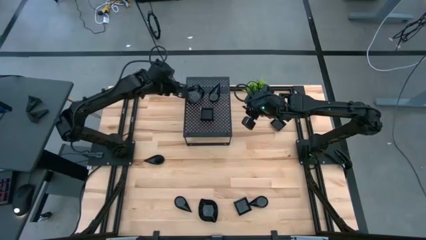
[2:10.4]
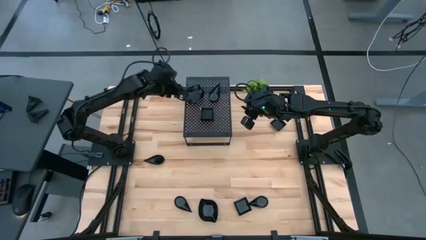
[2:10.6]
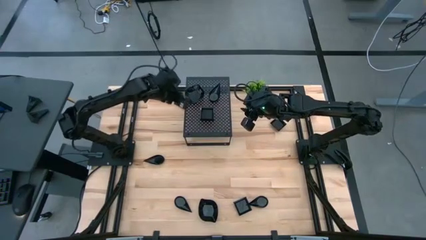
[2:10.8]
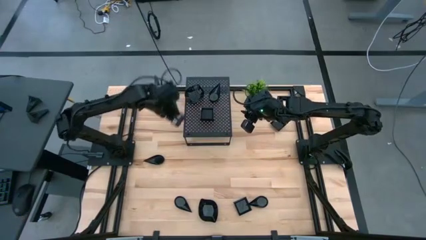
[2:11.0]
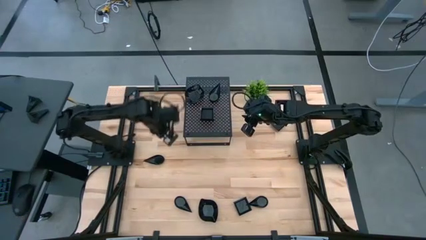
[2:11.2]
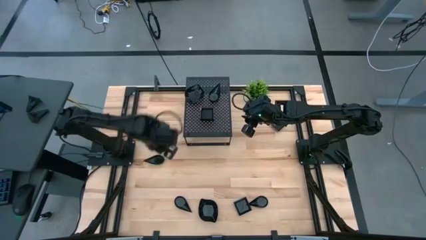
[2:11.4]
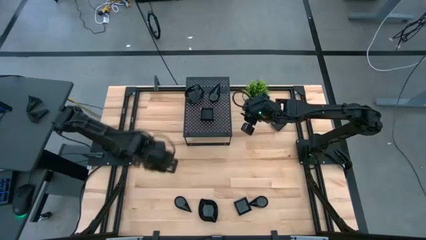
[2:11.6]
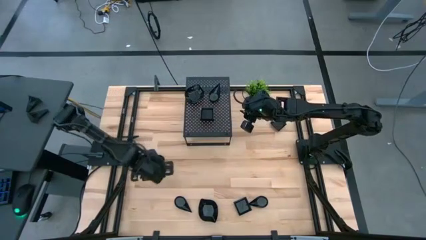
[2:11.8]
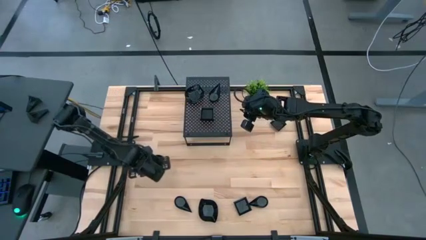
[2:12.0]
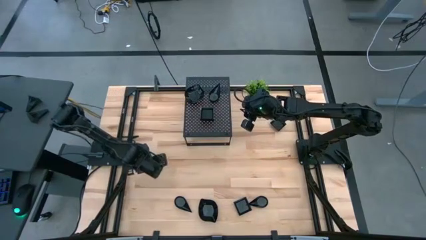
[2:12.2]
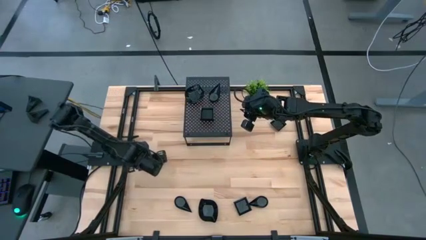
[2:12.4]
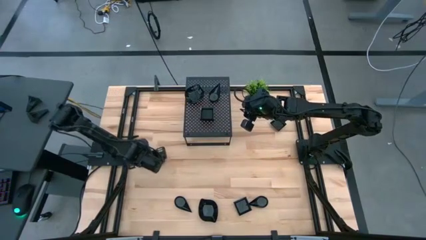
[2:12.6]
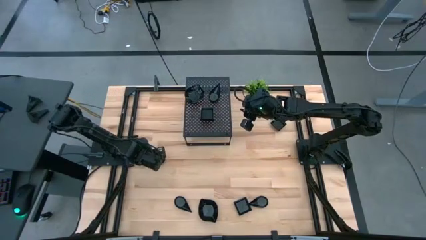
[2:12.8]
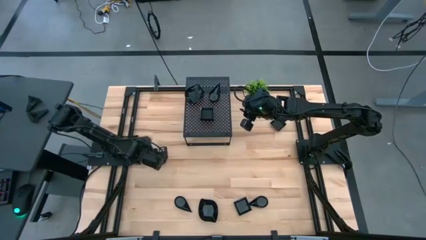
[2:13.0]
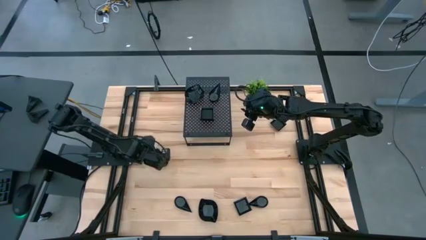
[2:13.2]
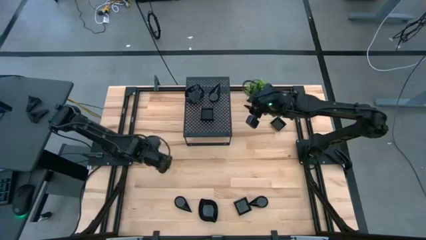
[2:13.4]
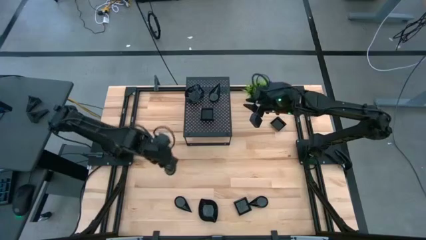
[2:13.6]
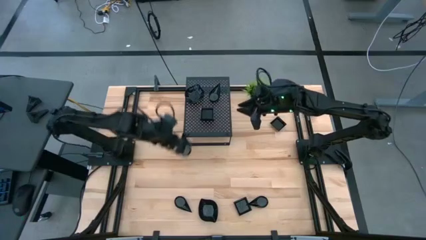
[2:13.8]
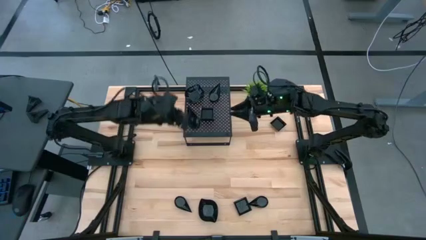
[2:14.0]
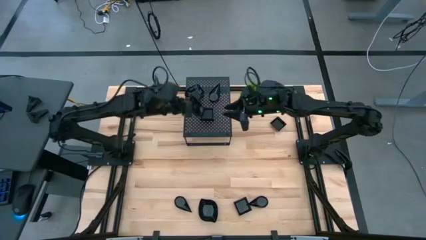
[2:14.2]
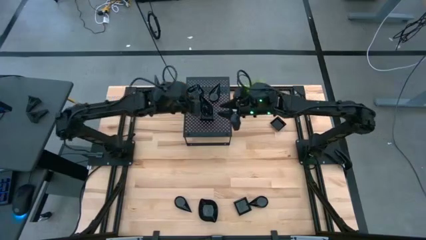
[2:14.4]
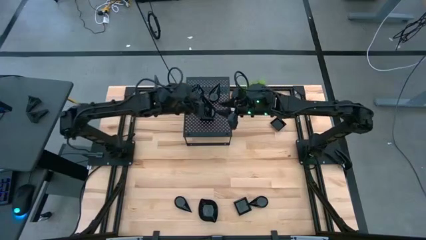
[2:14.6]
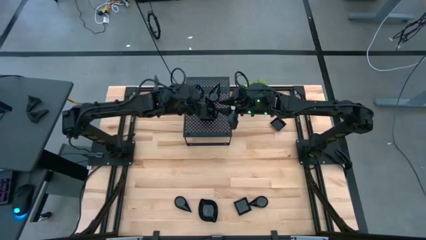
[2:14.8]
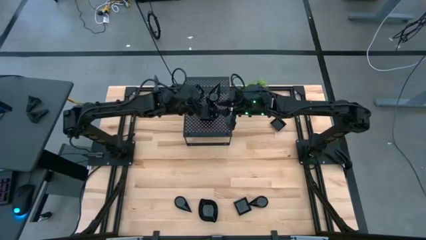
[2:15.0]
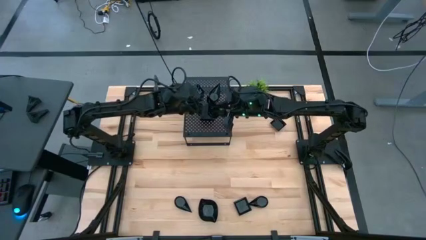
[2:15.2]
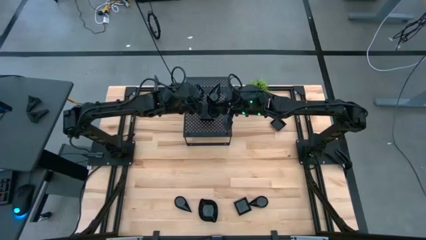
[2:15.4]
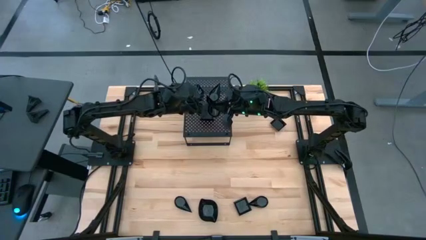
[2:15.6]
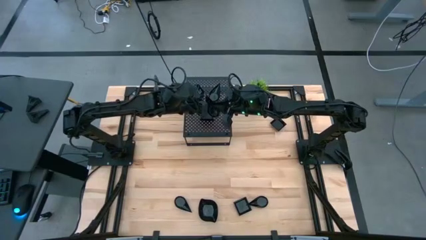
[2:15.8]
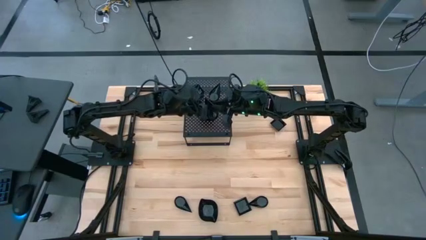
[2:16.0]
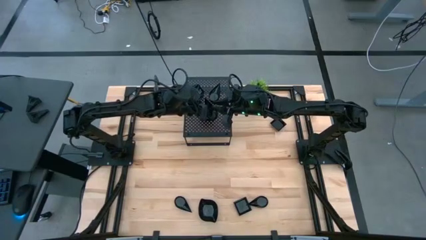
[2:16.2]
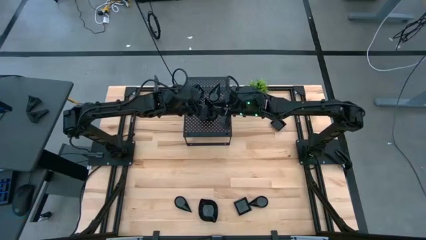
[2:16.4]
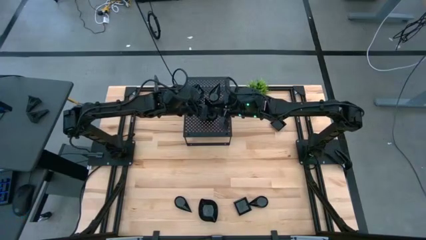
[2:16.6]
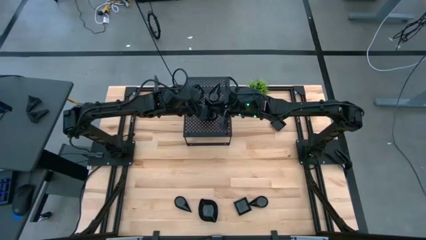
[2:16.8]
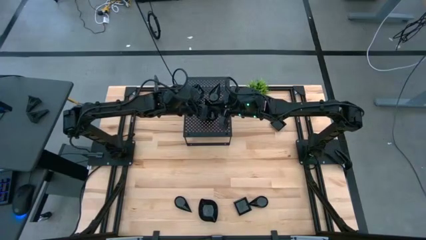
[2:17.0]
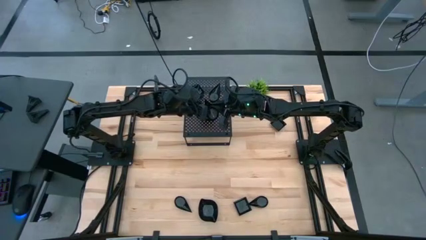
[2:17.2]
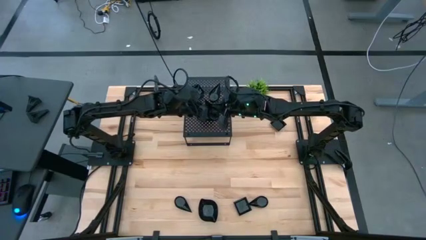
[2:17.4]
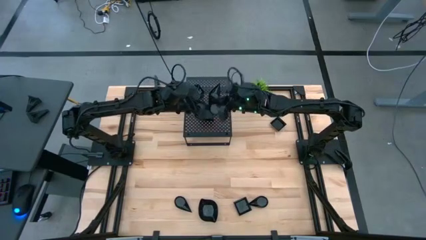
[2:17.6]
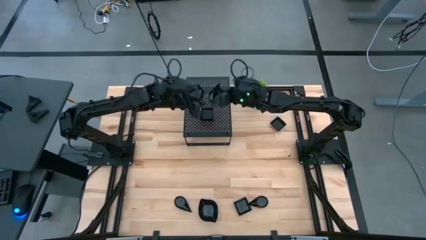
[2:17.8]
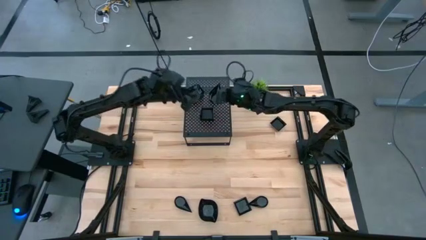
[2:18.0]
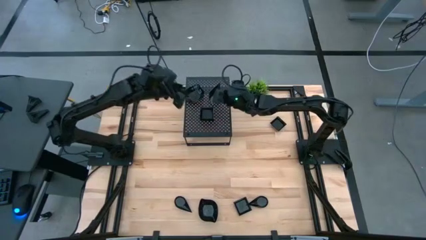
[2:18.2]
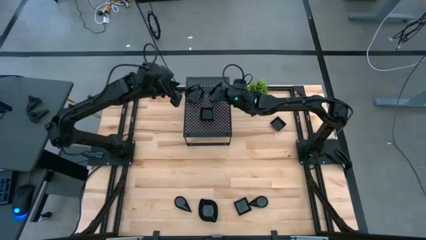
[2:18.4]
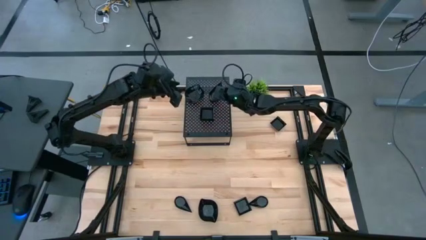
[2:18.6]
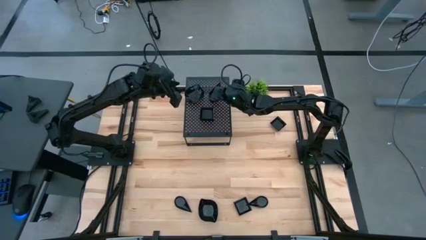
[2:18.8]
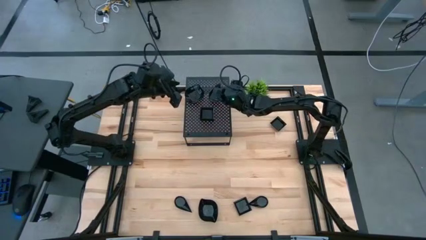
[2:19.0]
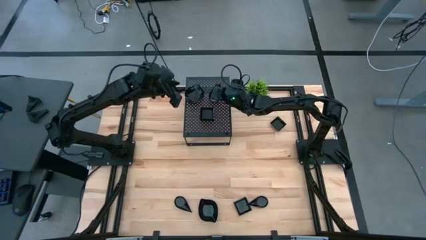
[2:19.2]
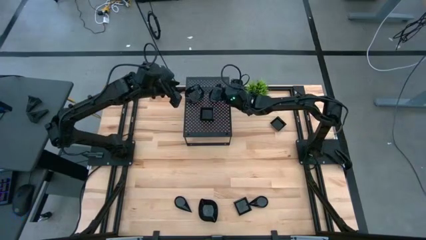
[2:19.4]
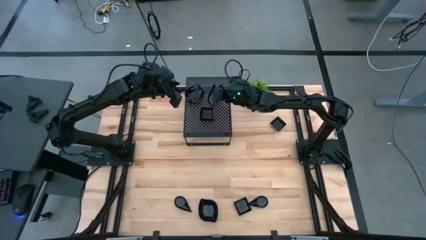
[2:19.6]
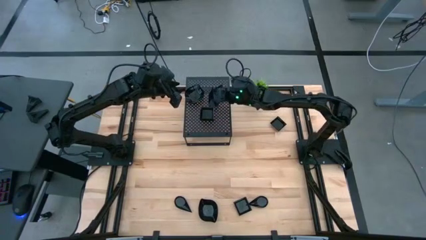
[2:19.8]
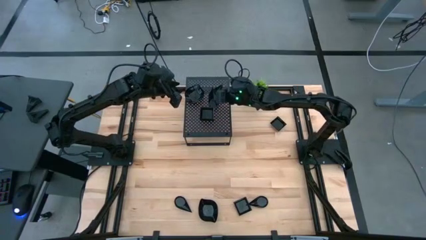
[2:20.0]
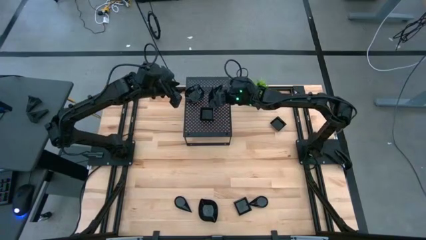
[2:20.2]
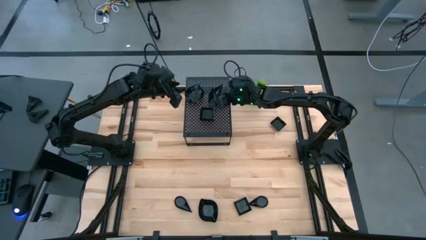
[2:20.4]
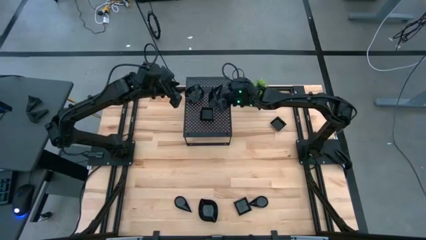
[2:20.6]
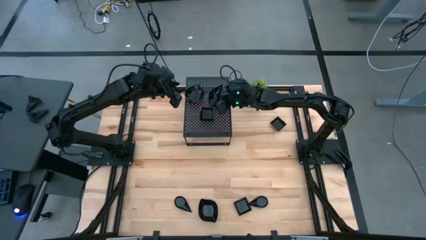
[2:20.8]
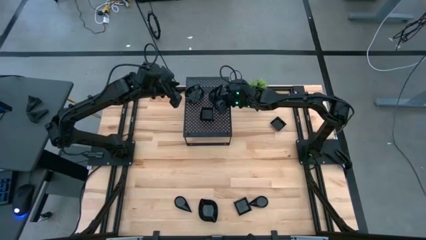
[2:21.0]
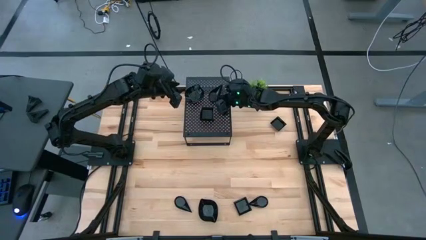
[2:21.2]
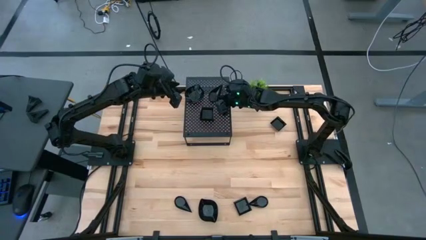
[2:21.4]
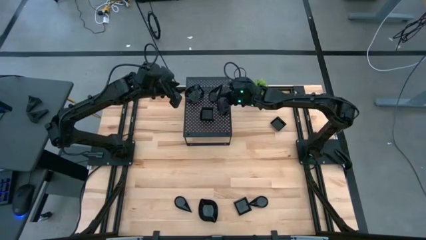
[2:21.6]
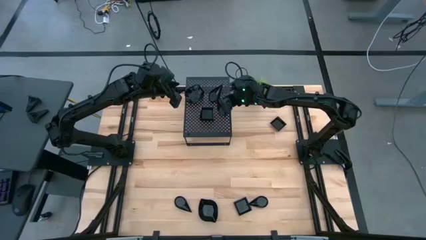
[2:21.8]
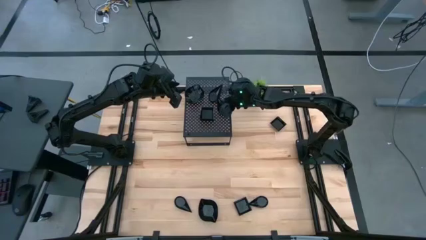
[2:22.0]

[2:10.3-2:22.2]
Task: Pick & Place Mini shaped plates
Stack the drop shaped plate on top of the drop shaped plates on the shelf

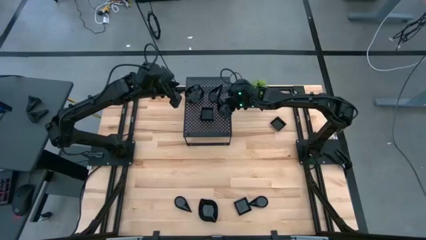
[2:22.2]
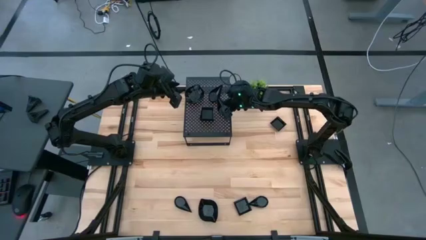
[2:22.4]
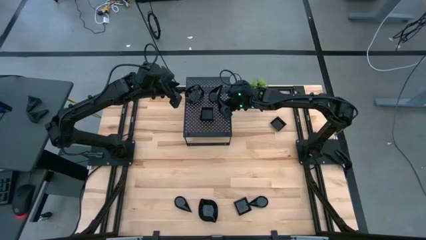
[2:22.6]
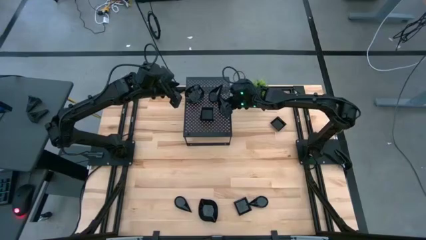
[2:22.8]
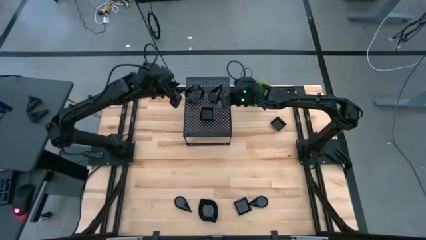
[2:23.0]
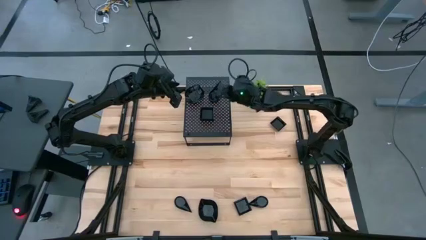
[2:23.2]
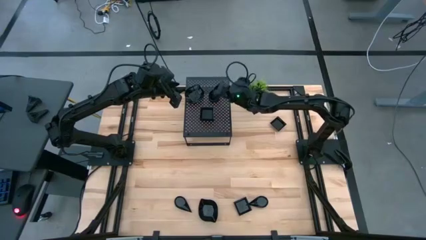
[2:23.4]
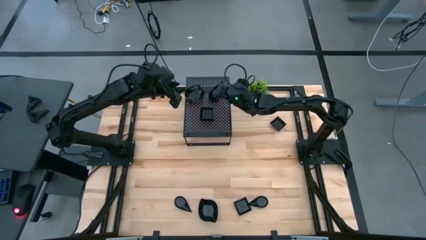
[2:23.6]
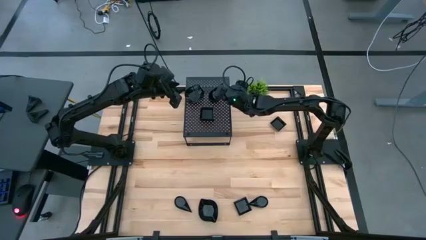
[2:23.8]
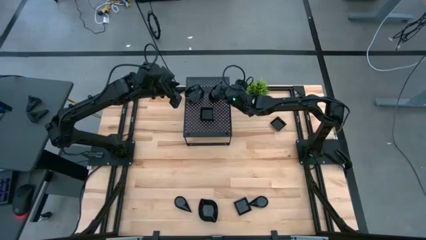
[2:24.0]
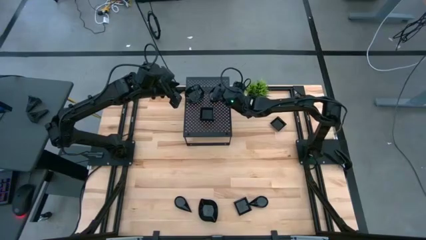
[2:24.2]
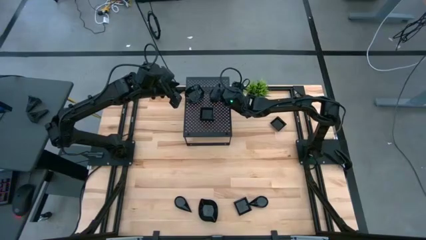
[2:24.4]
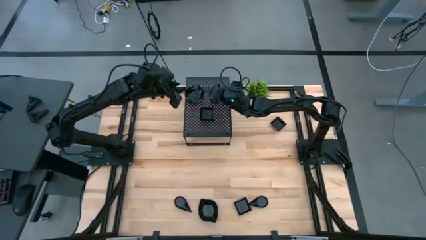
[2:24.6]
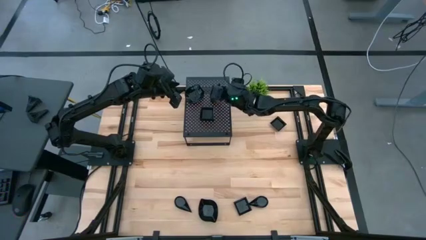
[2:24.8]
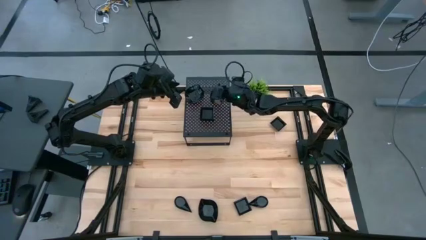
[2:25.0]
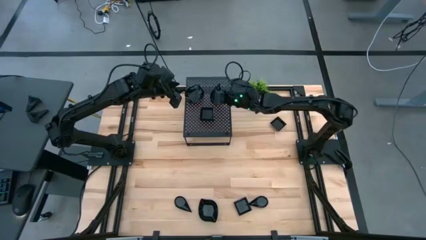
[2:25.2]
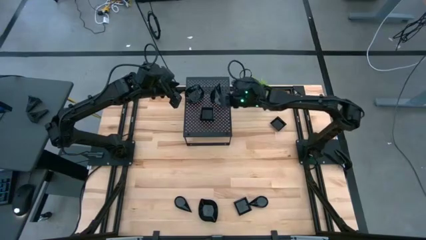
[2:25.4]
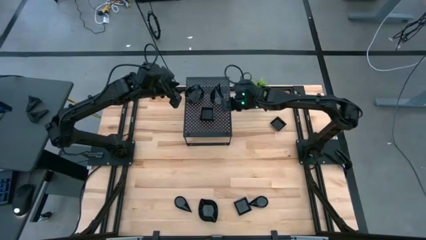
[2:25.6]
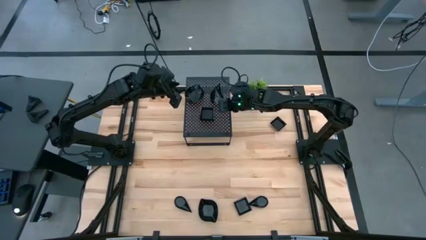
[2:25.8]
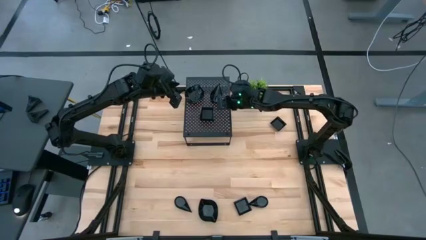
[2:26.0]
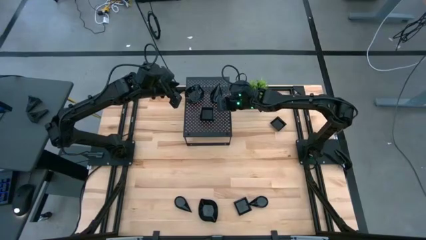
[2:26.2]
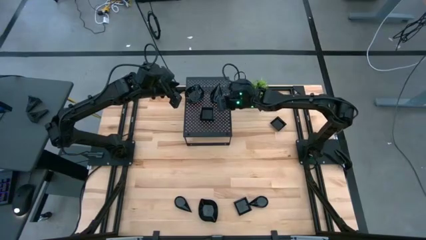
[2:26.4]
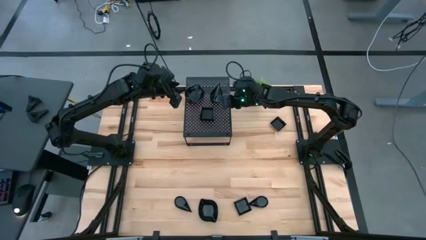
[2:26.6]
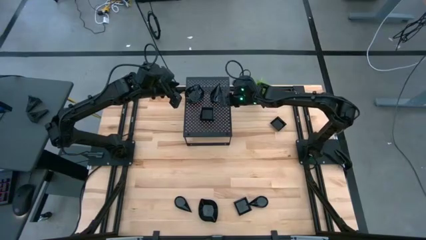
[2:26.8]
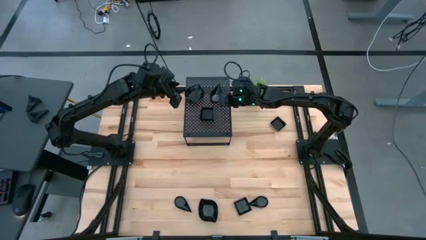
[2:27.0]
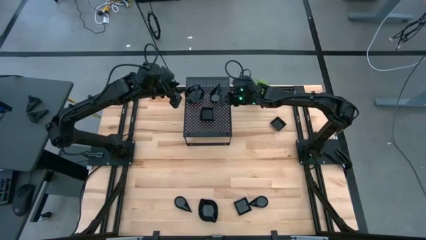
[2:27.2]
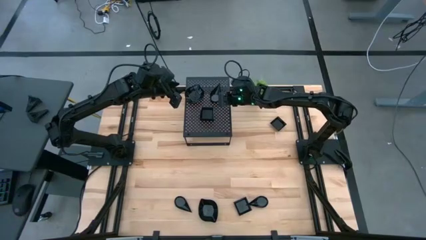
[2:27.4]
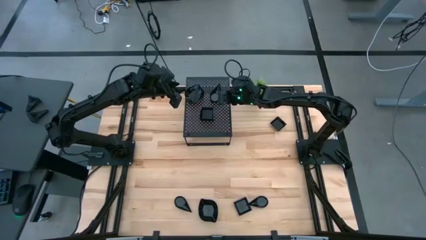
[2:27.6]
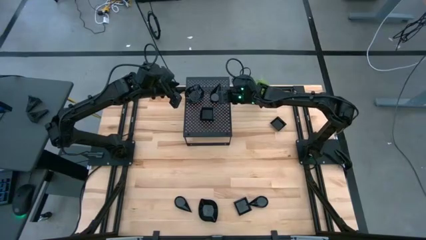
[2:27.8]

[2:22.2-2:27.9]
Stack the drop shaped plate on top of the drop shaped plates on the shelf
